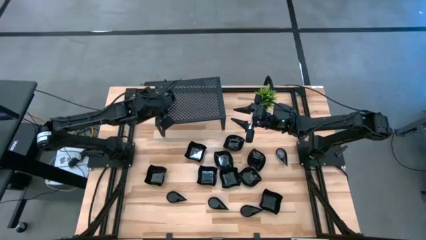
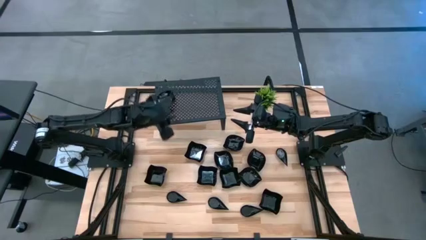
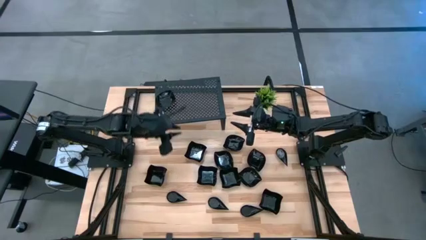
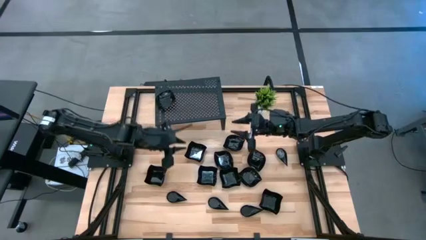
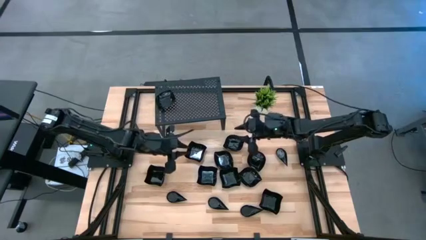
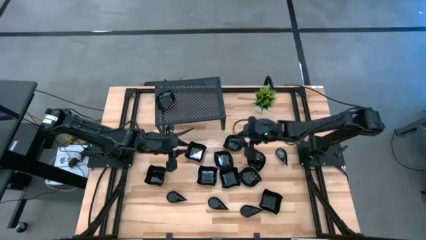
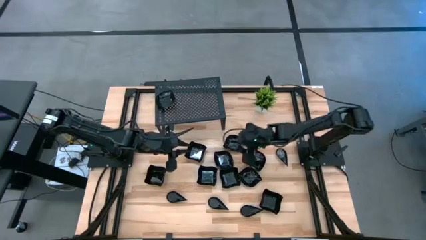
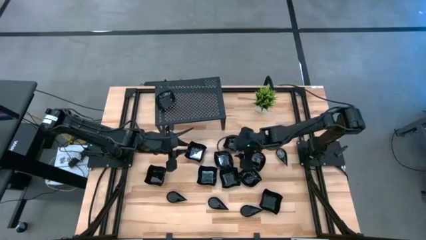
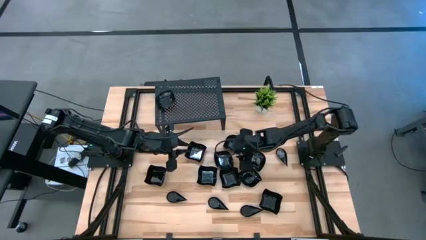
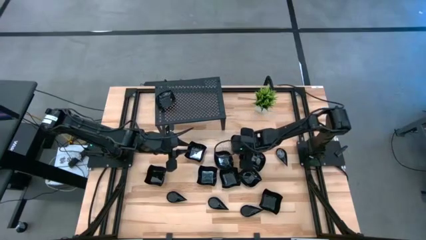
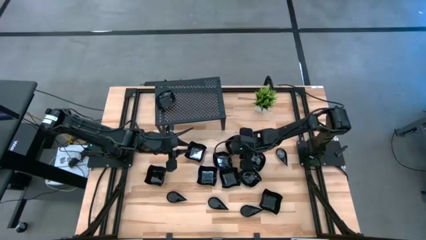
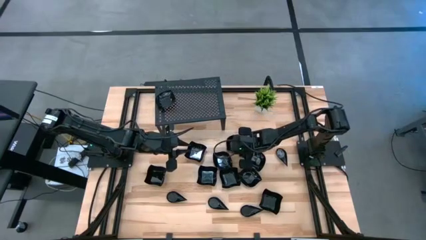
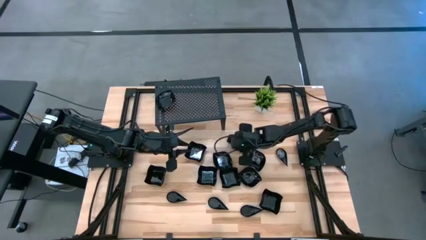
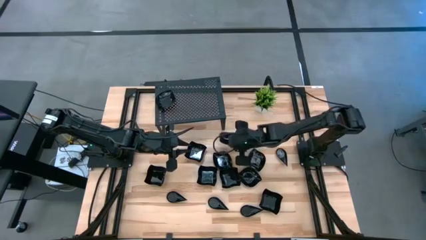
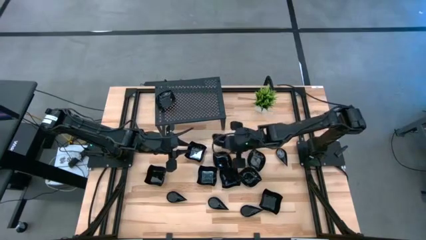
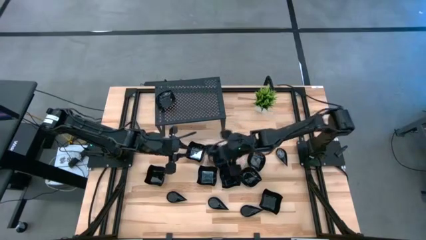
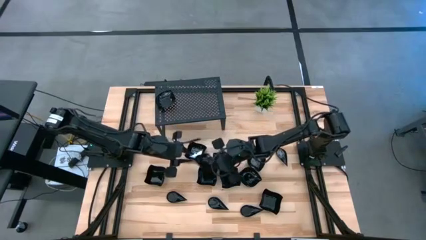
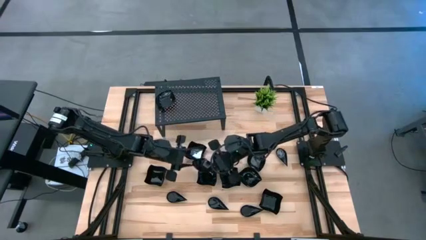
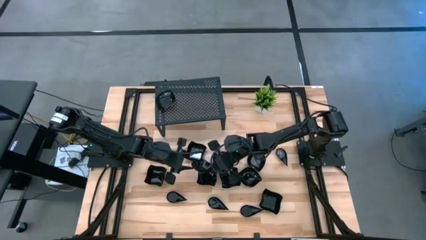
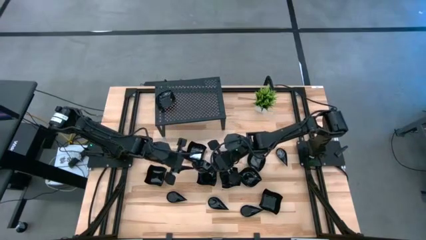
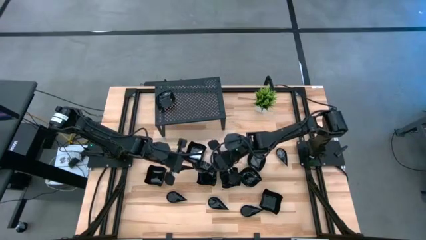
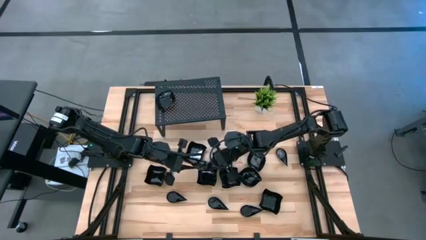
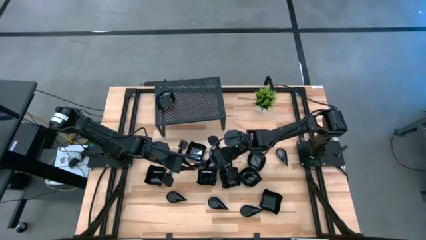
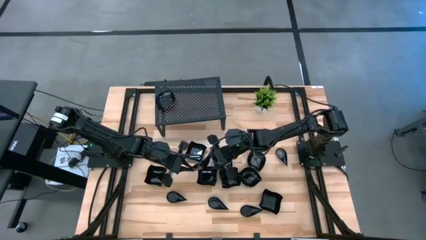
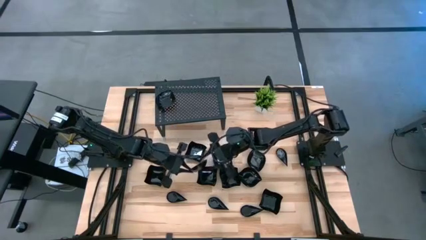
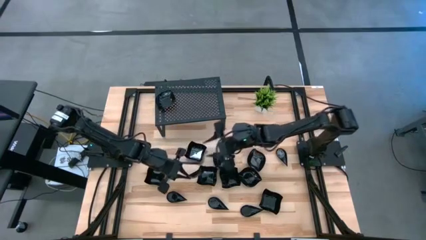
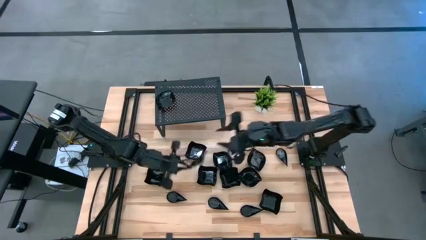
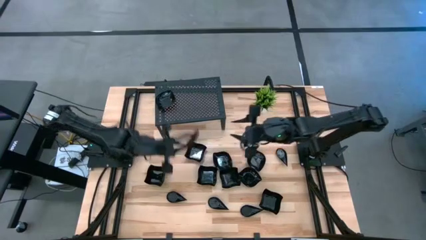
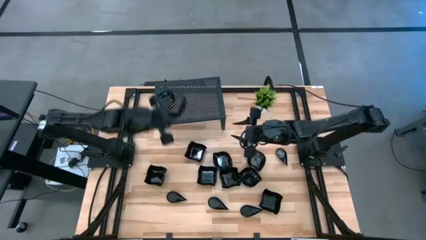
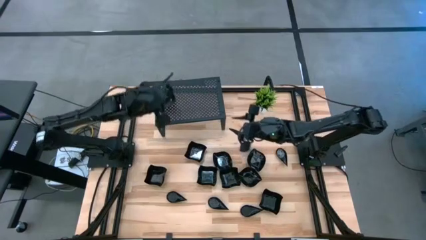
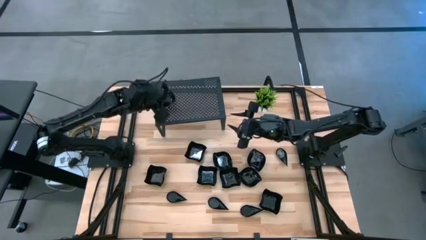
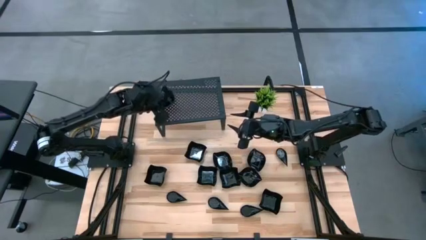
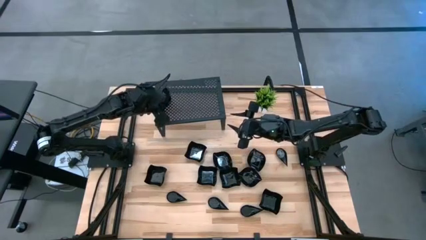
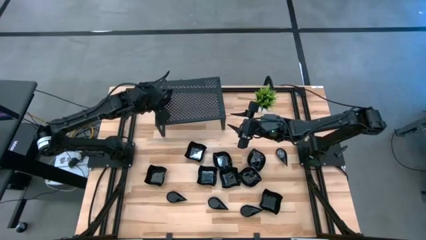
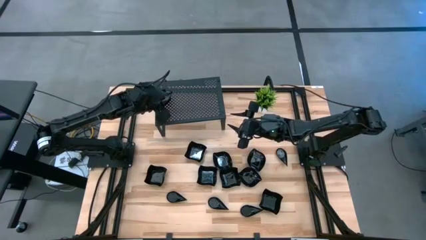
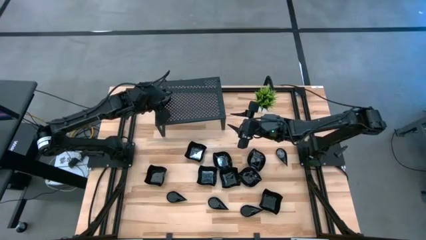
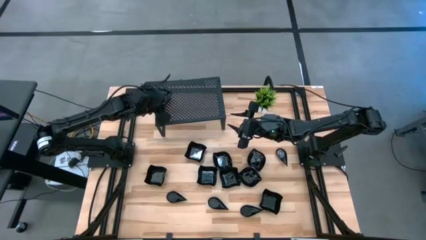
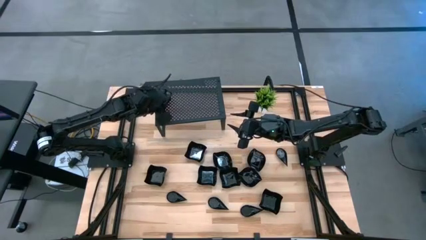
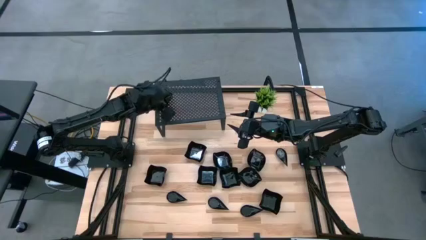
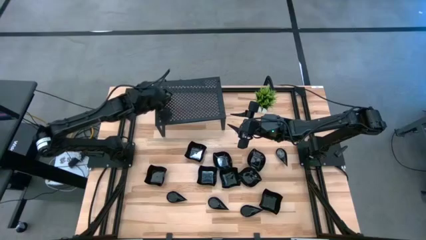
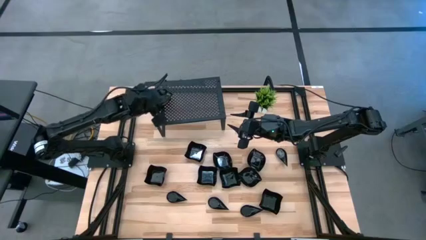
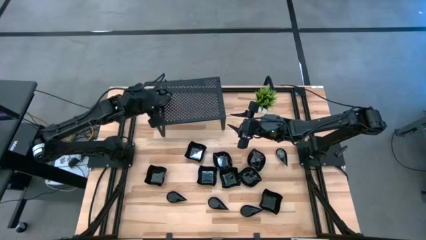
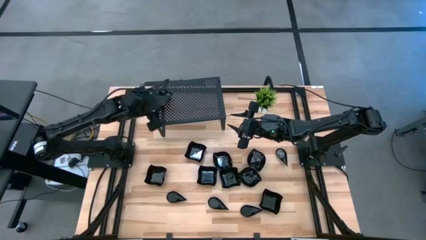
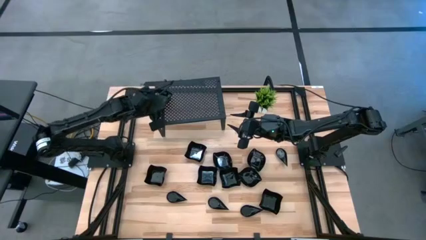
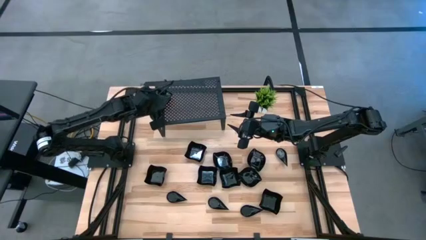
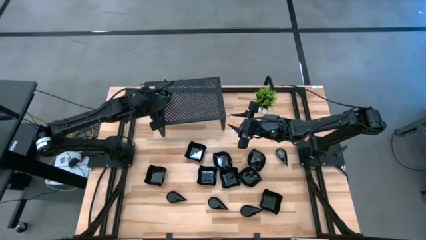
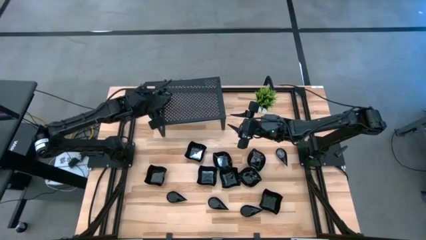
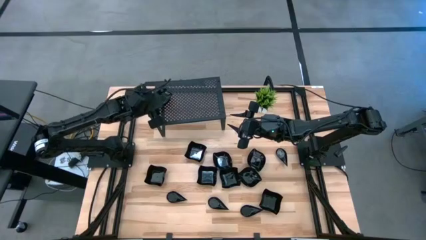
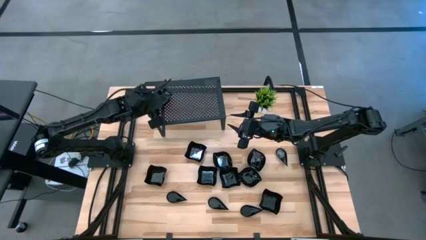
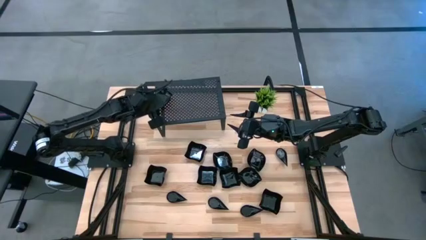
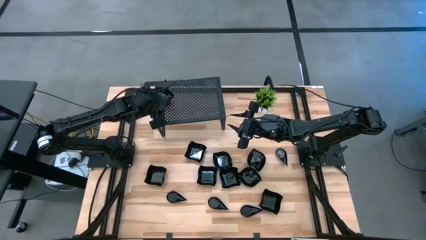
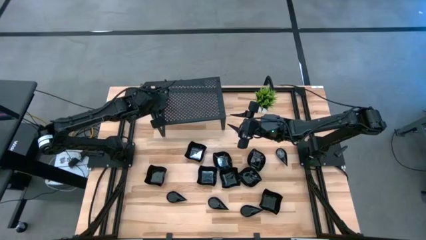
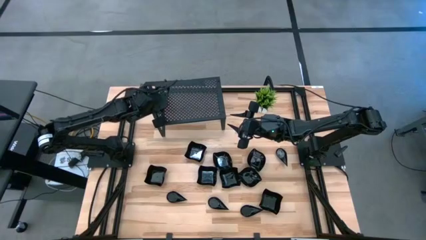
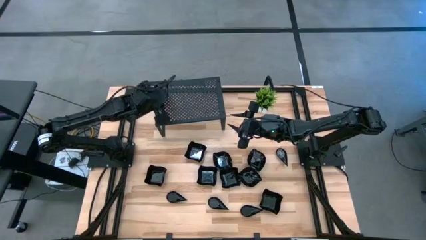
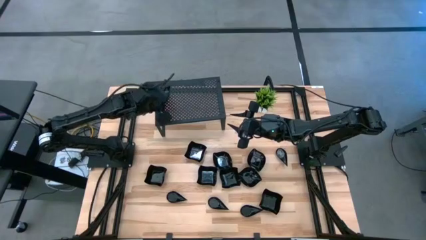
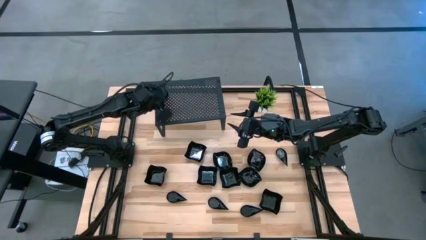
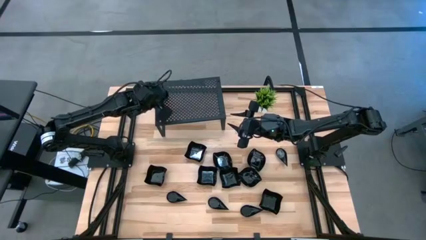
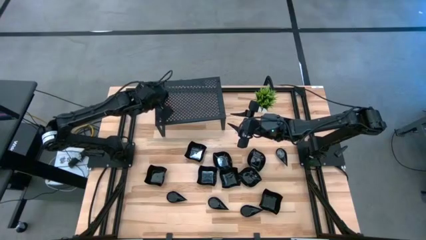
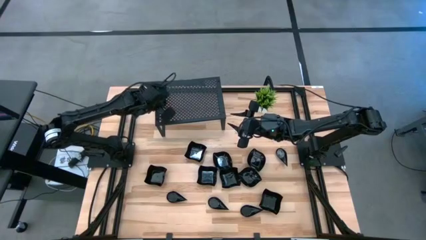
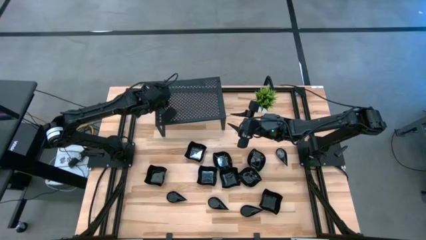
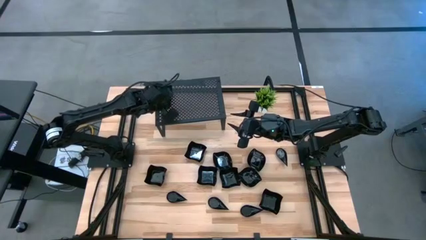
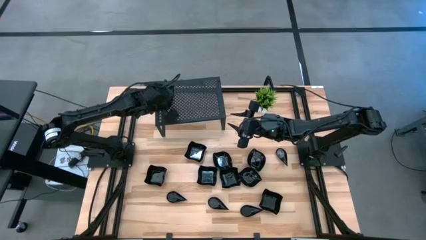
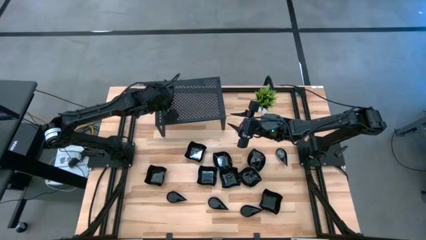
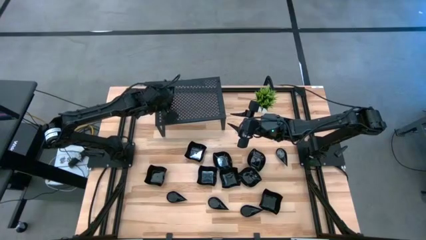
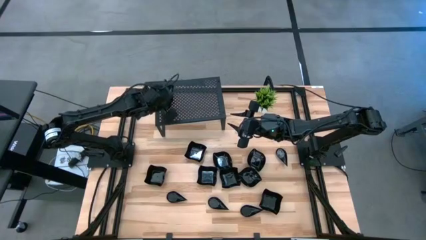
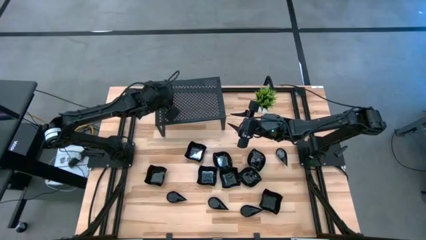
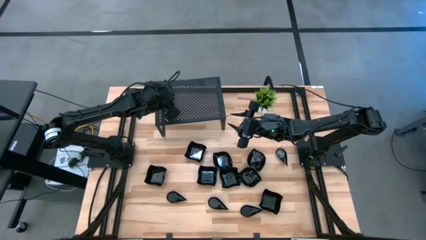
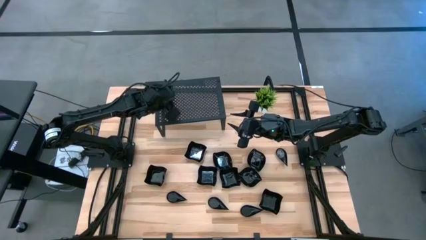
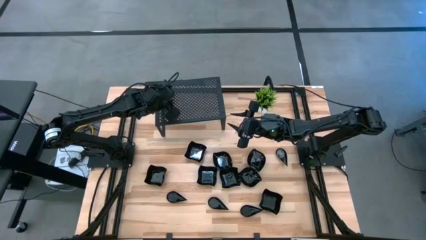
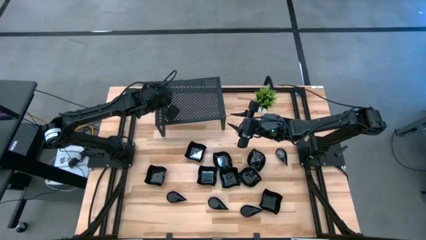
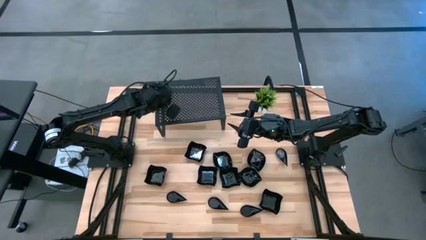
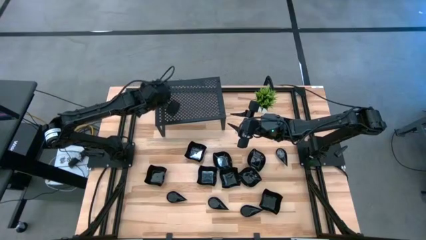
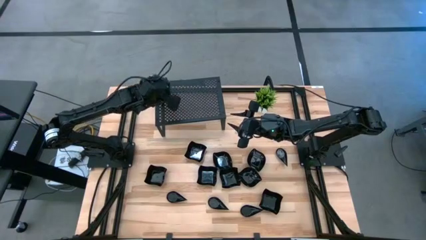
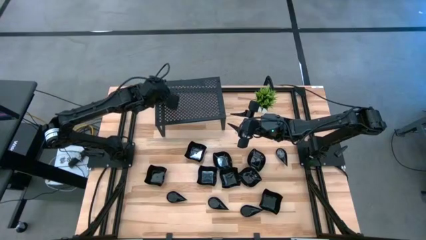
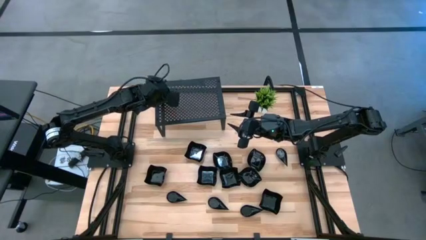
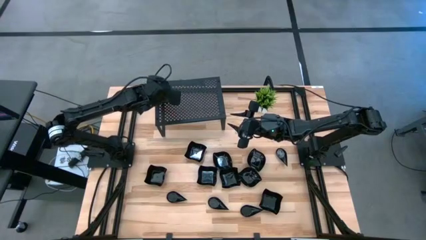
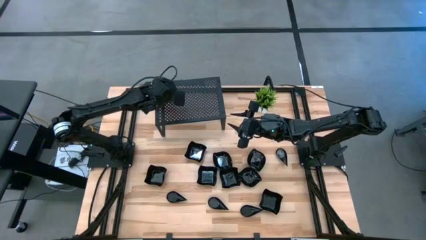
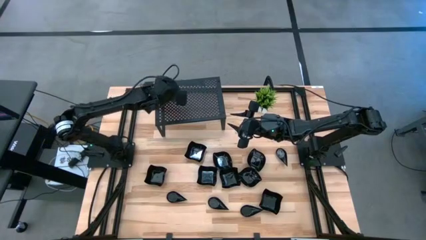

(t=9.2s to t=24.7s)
Task: Pick & Place Mini shaped plates
Stack the black leaf shaped plate on top of the black leaf shaped plate on the shelf
